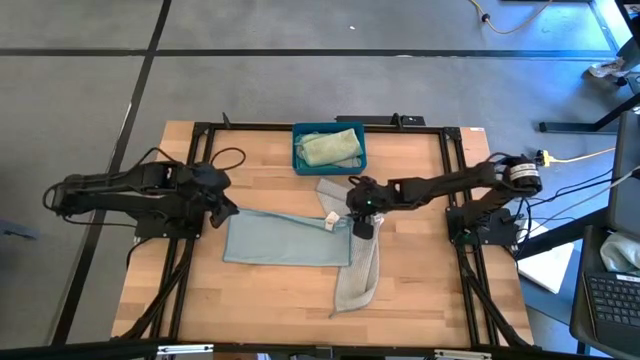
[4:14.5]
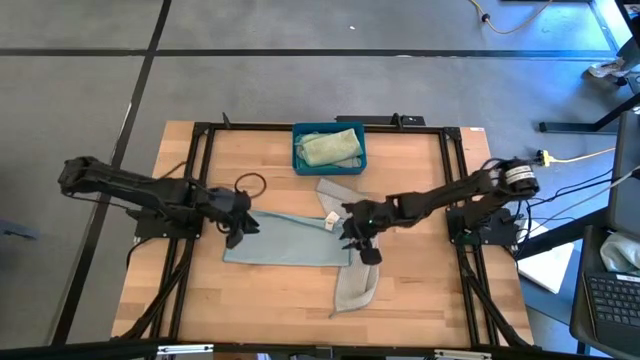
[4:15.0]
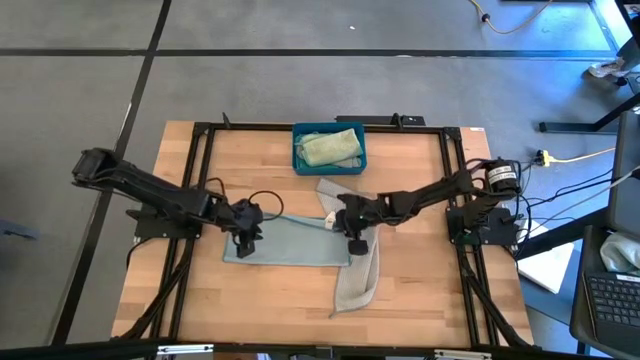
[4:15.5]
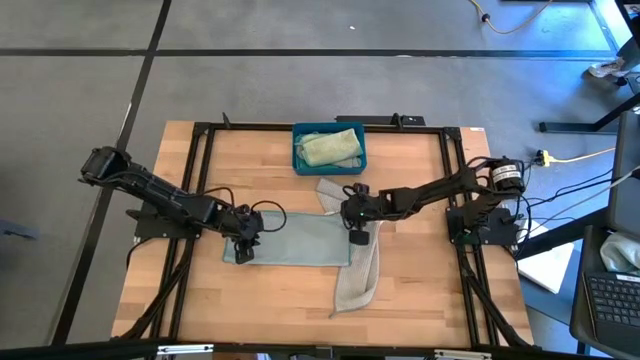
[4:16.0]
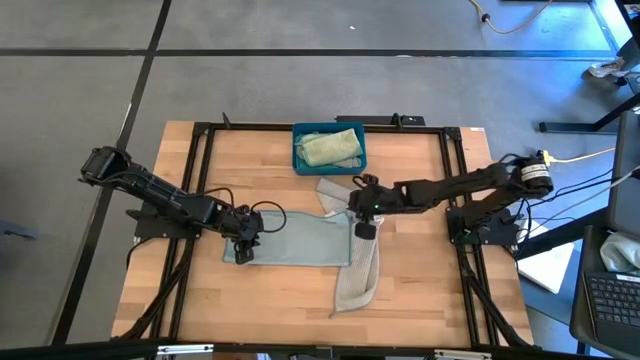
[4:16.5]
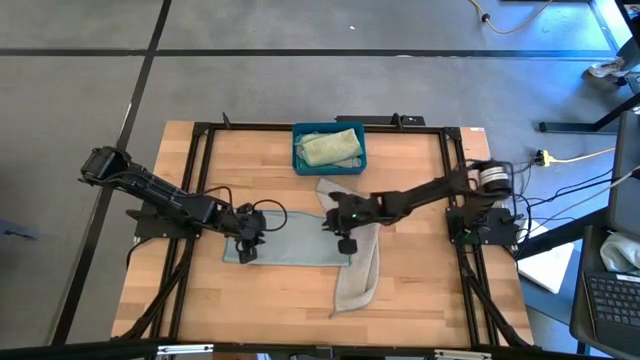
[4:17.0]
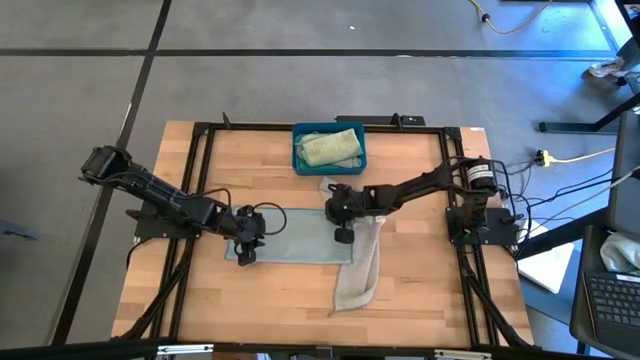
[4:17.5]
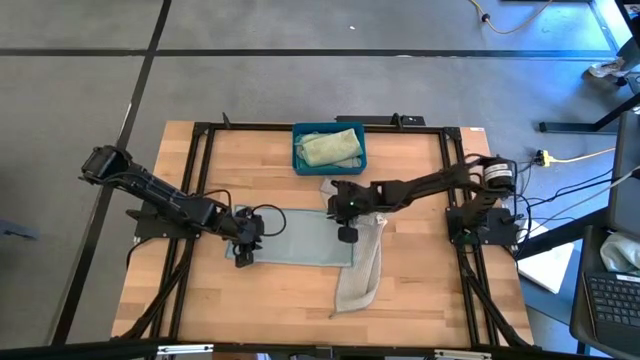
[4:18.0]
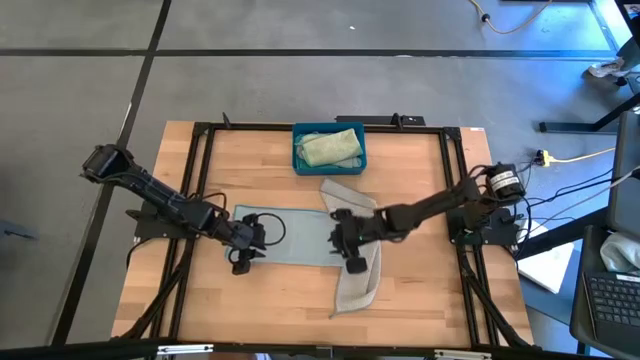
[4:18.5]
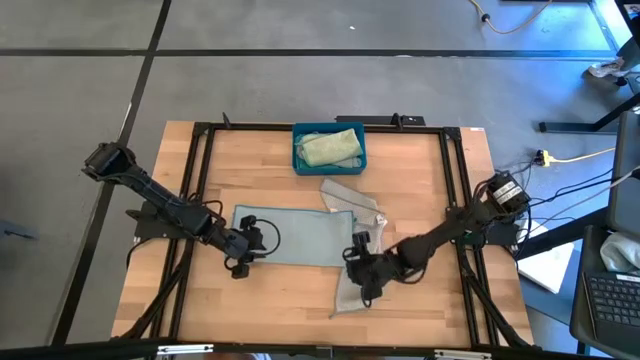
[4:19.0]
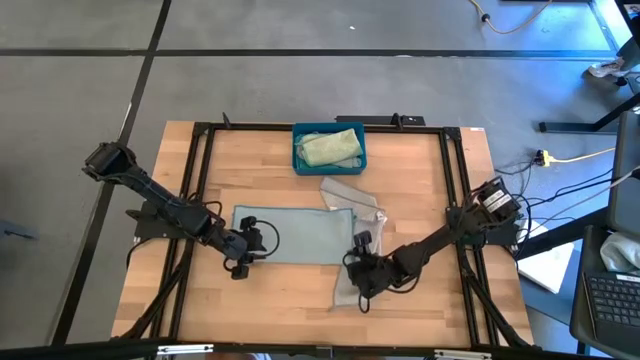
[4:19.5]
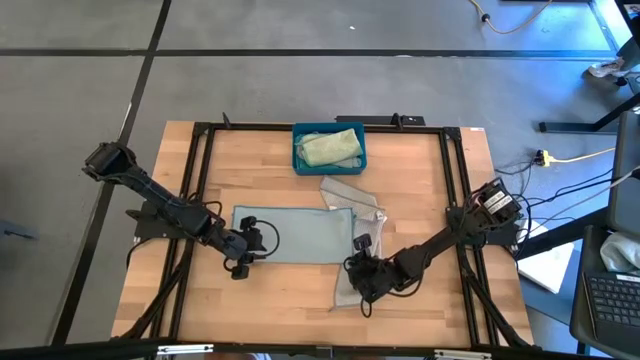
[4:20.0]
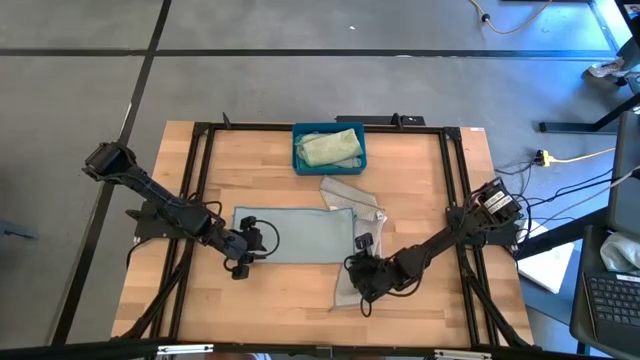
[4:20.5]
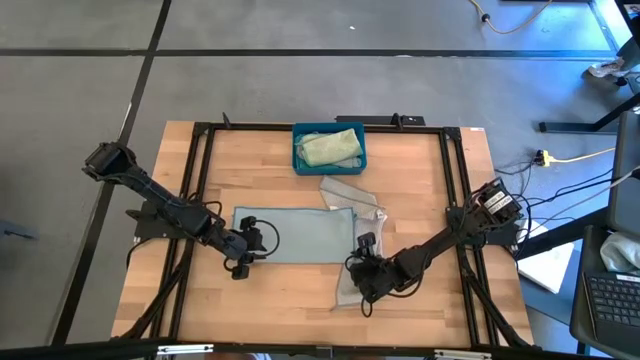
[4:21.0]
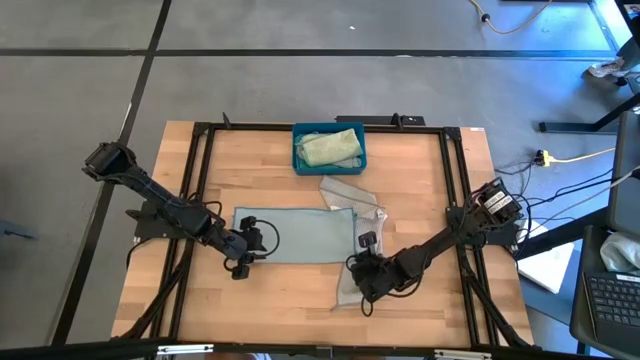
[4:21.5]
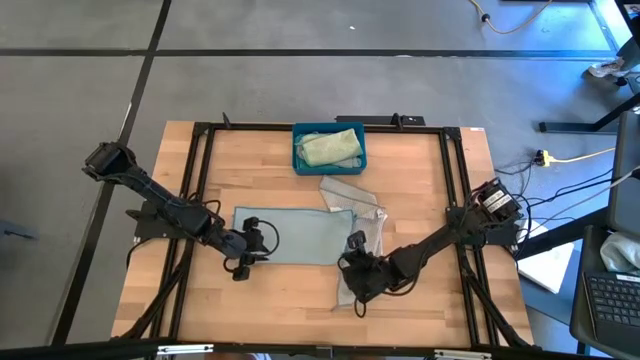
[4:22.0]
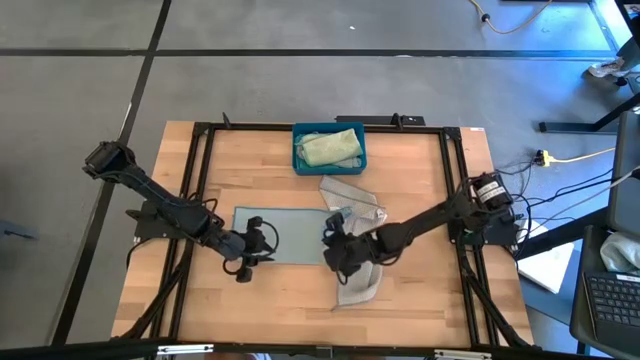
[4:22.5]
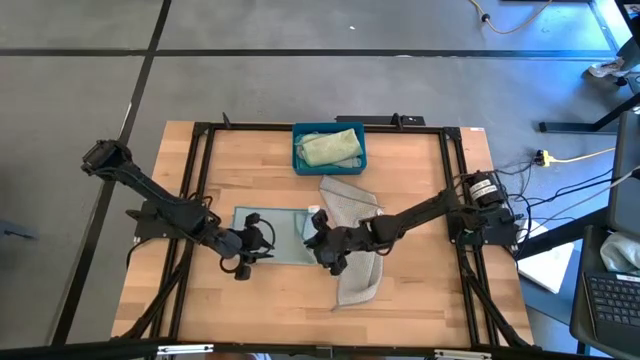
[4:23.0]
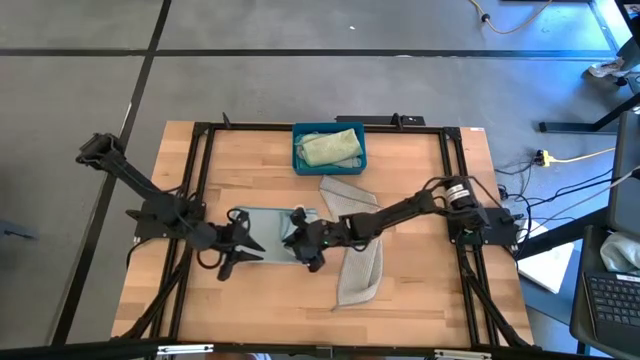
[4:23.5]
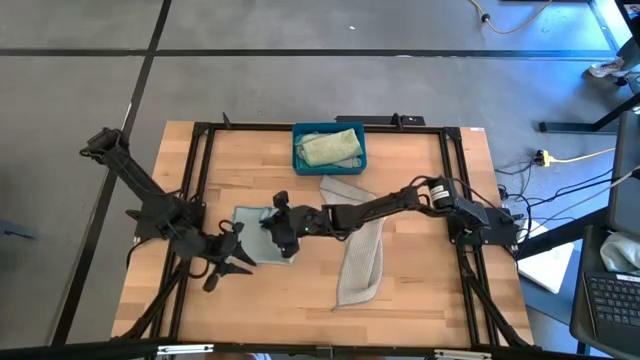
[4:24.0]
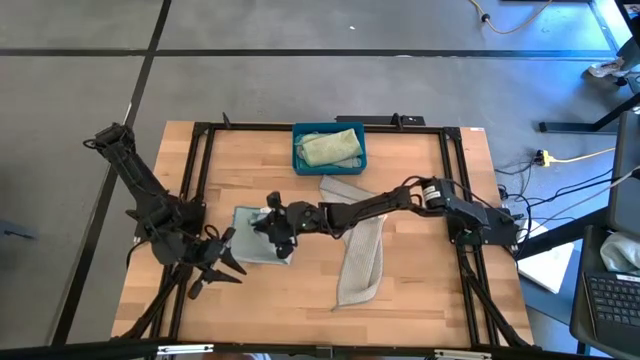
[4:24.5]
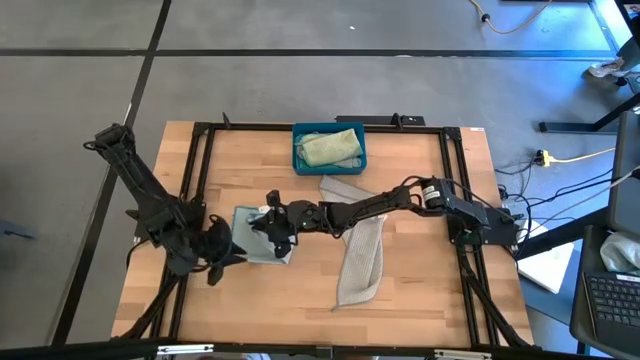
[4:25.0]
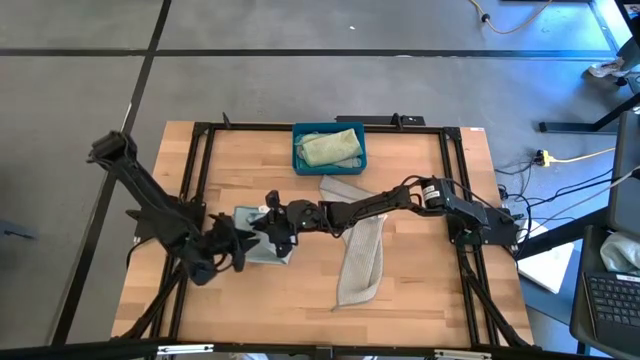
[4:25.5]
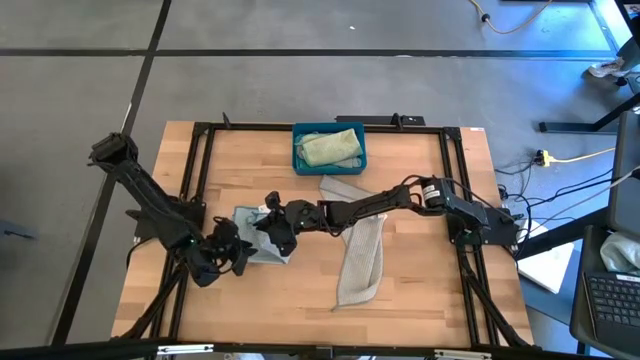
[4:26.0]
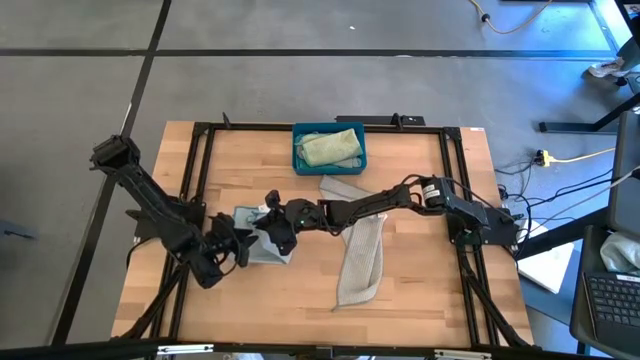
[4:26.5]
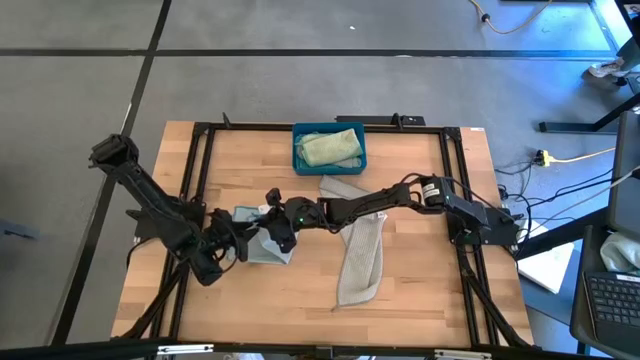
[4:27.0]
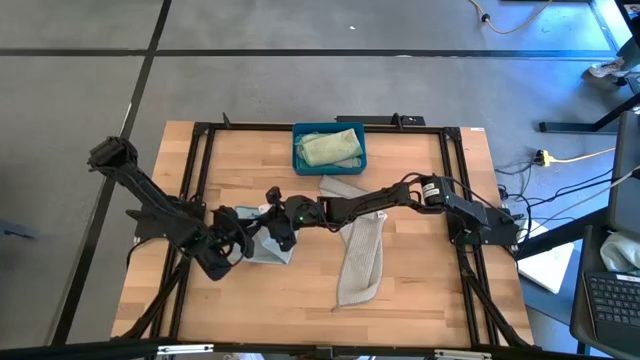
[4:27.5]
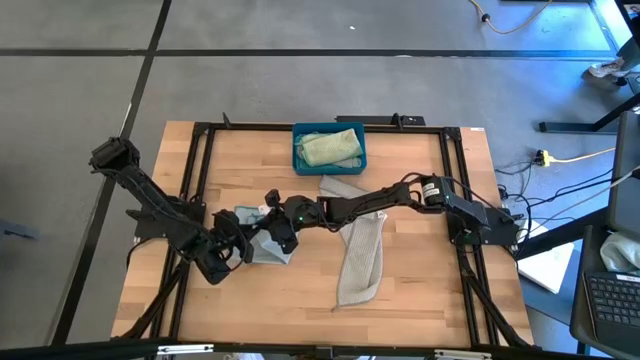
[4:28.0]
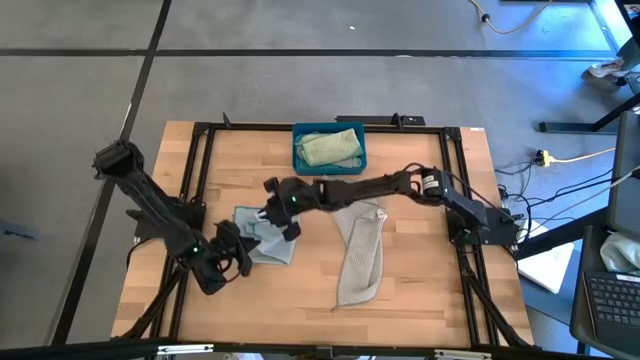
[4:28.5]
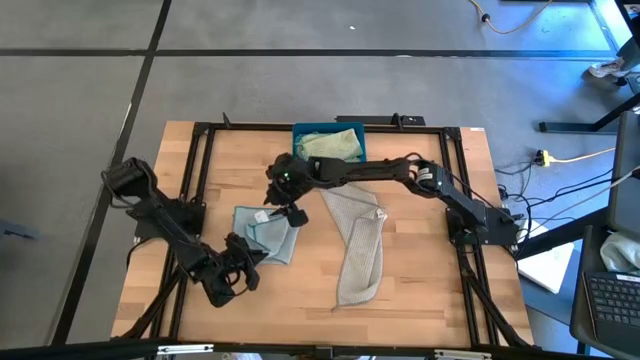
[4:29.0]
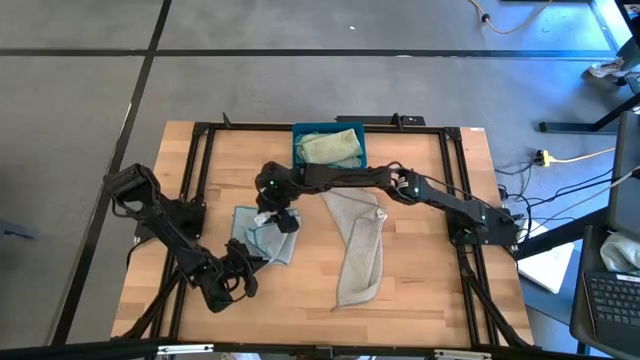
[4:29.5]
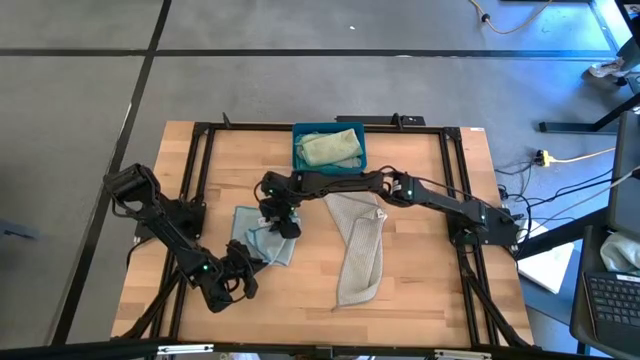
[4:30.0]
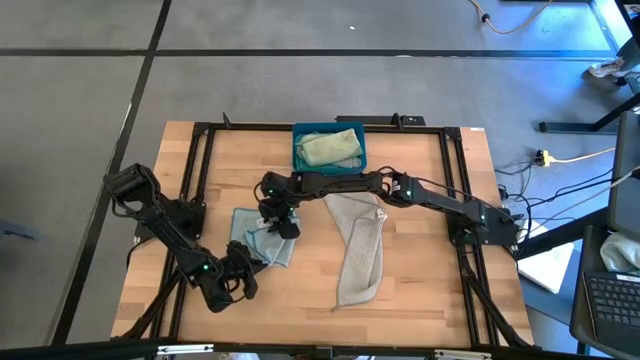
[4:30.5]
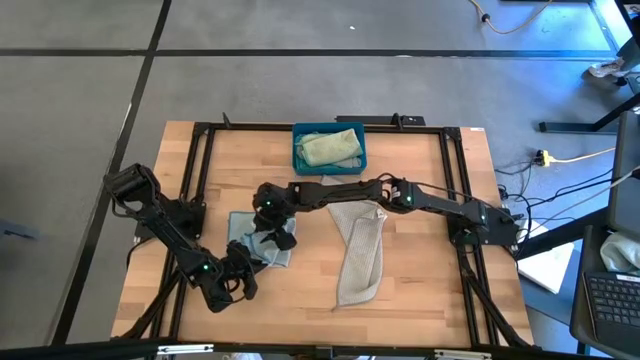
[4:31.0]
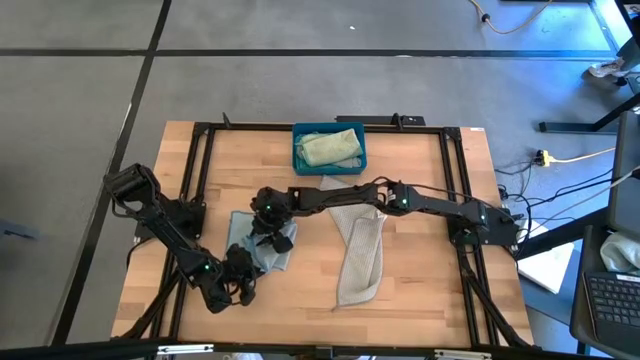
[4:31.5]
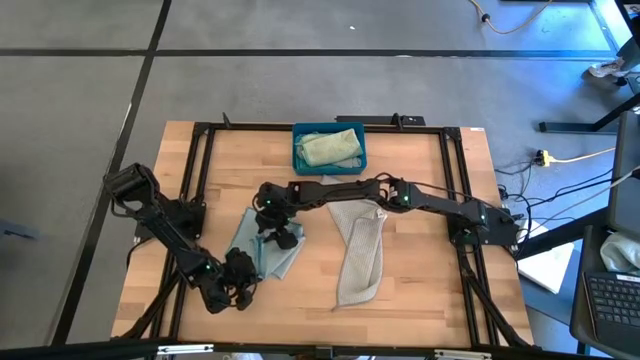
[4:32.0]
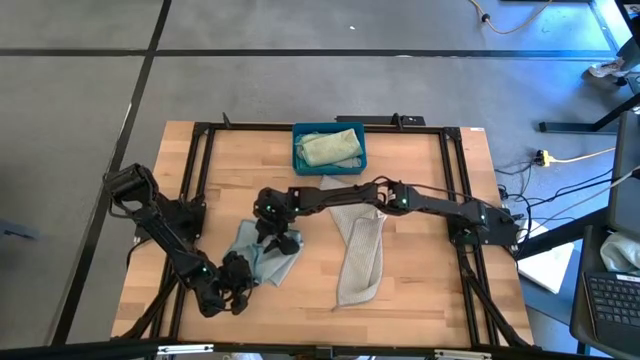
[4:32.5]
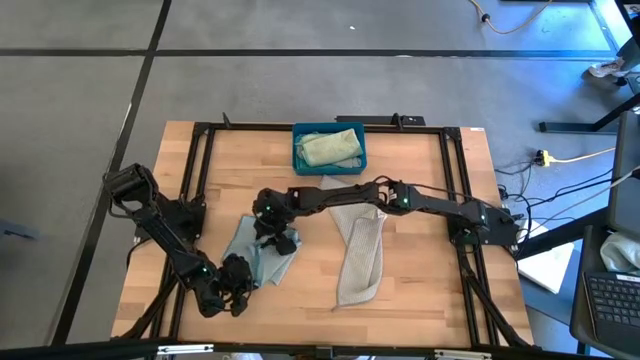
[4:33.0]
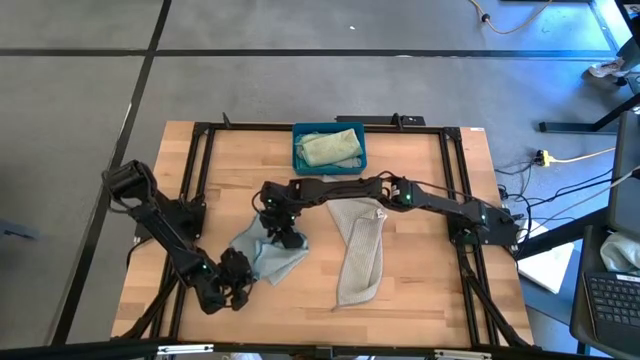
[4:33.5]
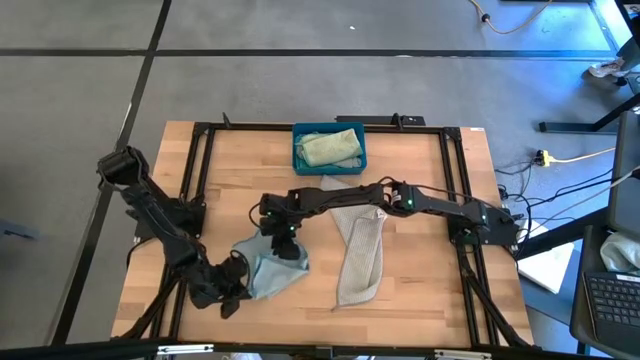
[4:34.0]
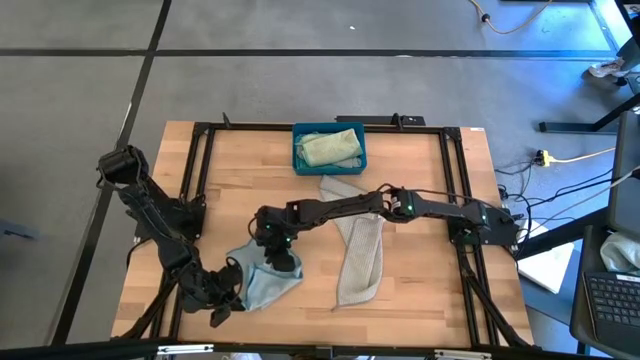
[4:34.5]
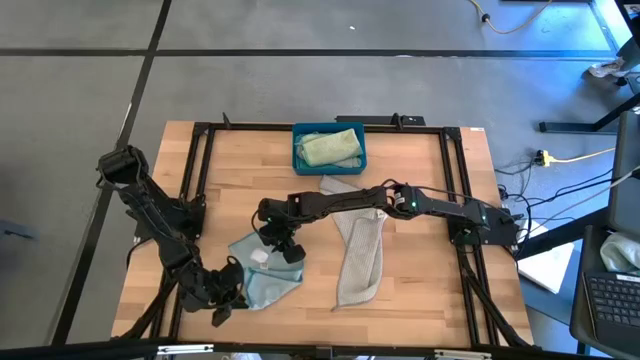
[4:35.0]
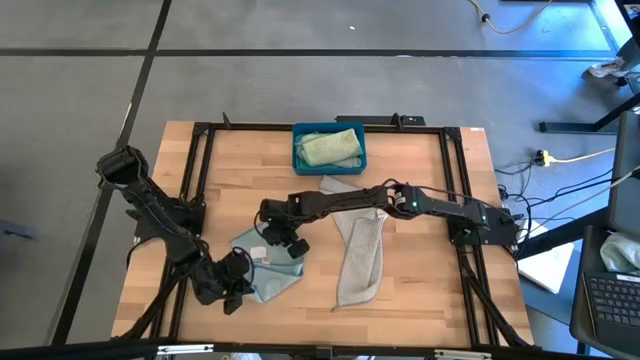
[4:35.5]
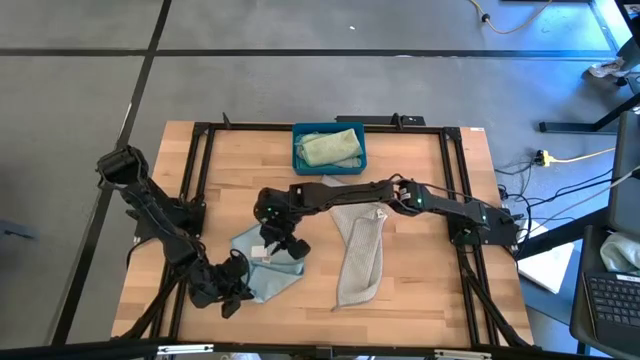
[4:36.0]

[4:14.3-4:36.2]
Task: Fold microfiber towels
Fold the light blue towel
